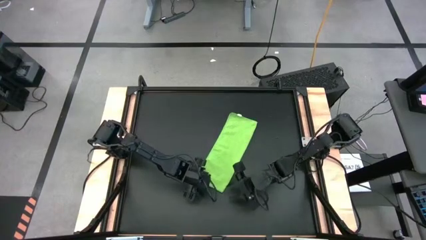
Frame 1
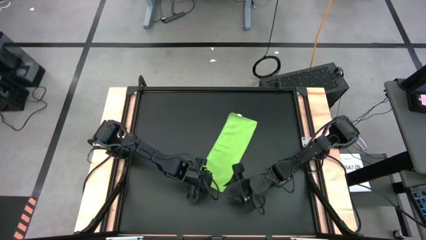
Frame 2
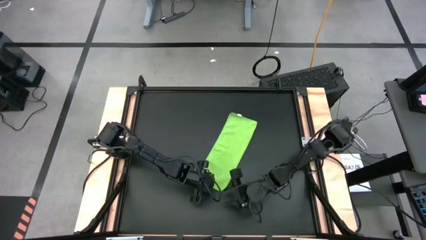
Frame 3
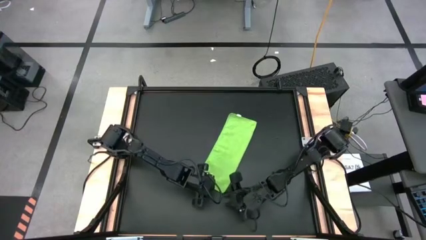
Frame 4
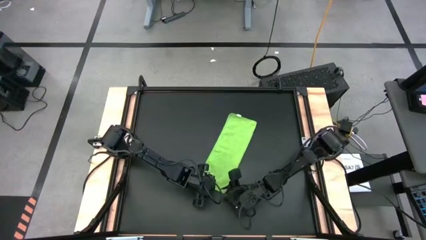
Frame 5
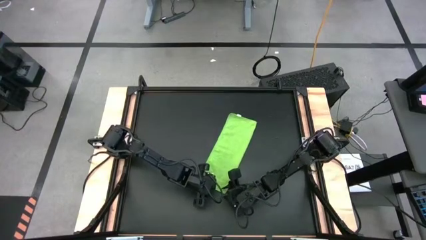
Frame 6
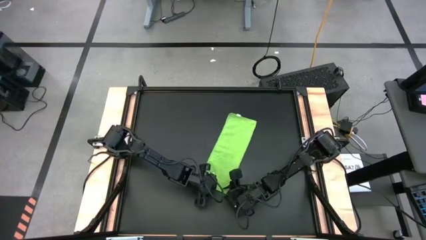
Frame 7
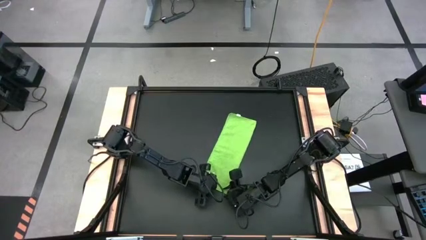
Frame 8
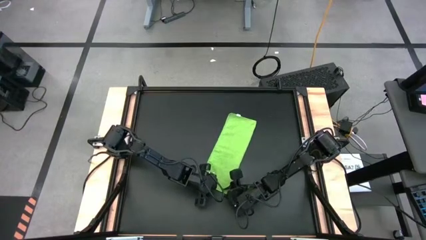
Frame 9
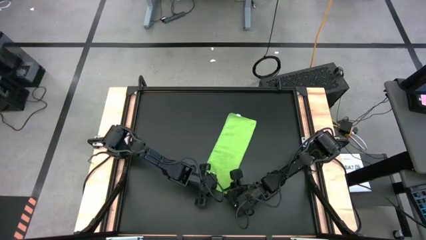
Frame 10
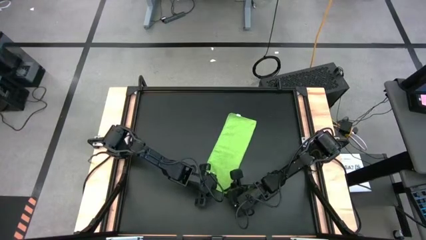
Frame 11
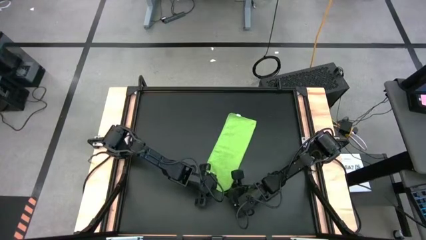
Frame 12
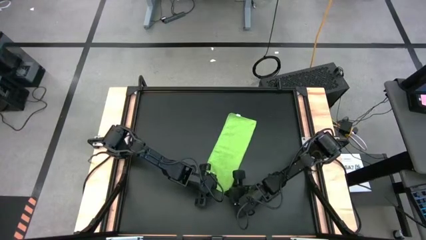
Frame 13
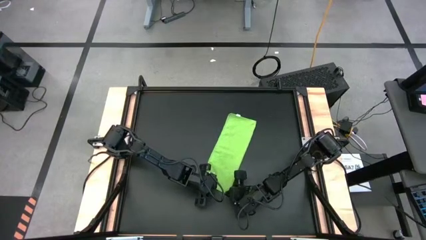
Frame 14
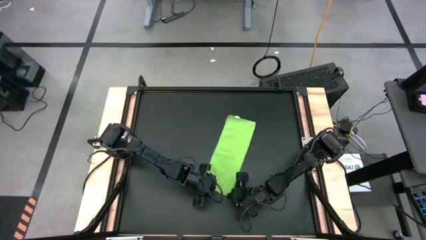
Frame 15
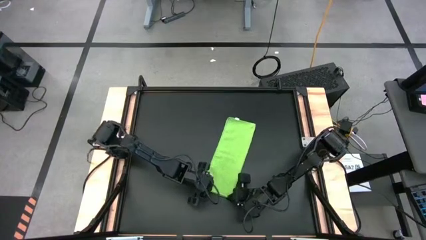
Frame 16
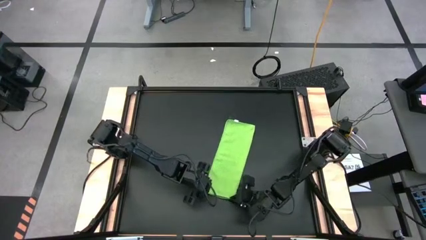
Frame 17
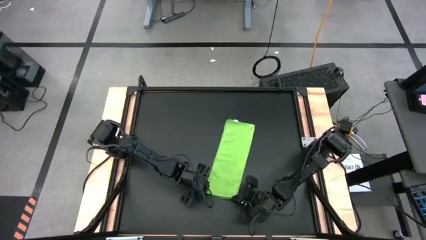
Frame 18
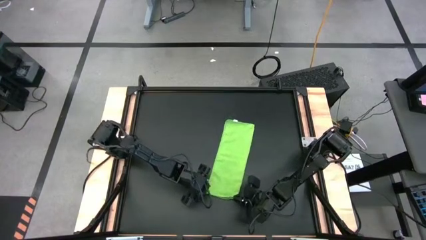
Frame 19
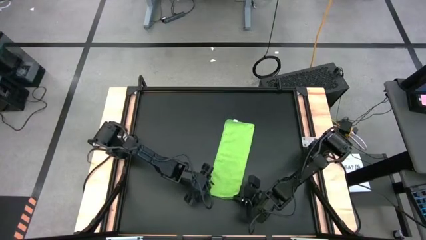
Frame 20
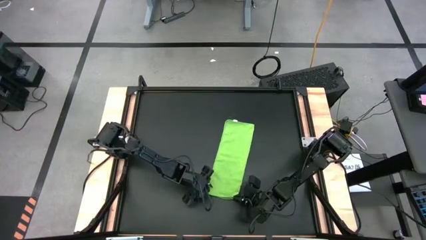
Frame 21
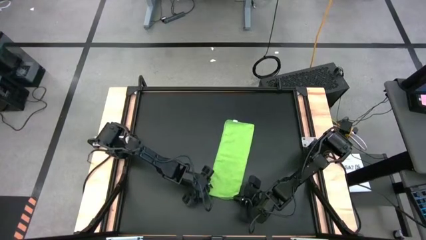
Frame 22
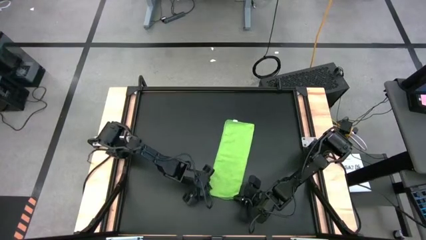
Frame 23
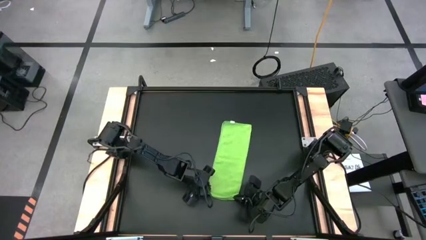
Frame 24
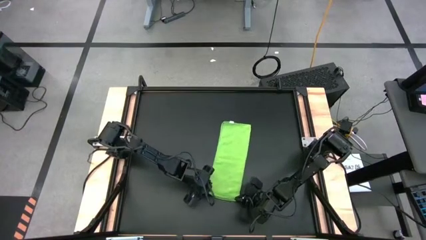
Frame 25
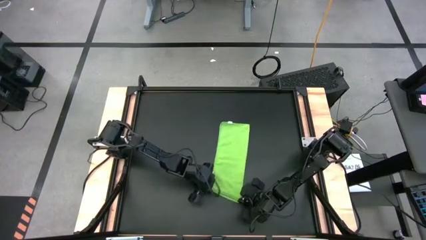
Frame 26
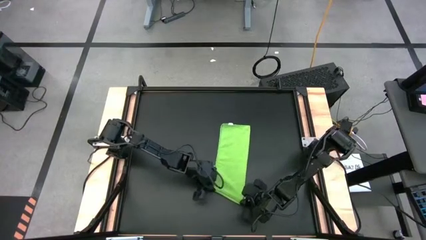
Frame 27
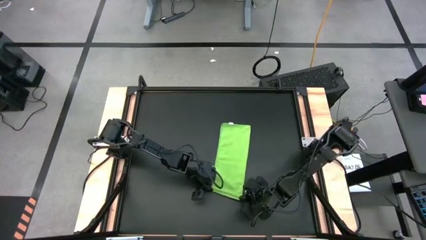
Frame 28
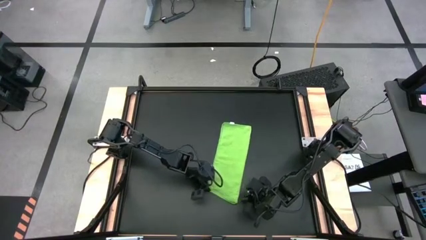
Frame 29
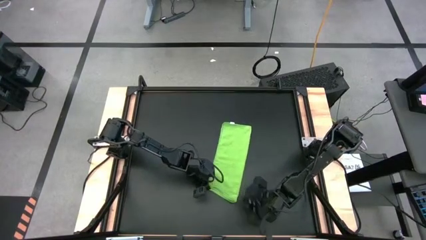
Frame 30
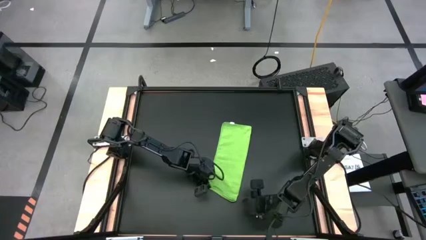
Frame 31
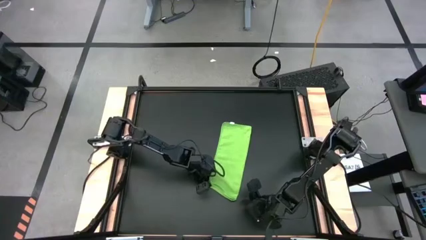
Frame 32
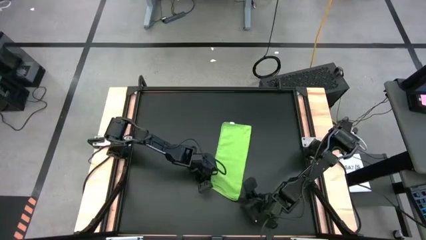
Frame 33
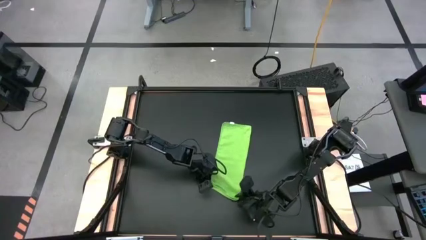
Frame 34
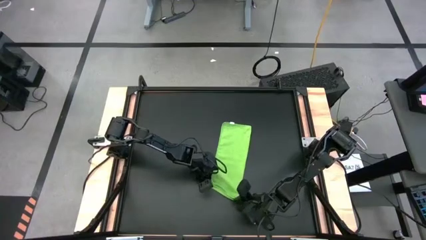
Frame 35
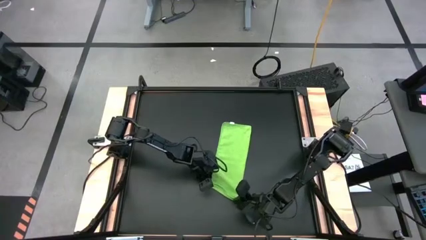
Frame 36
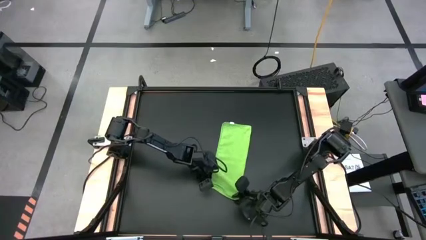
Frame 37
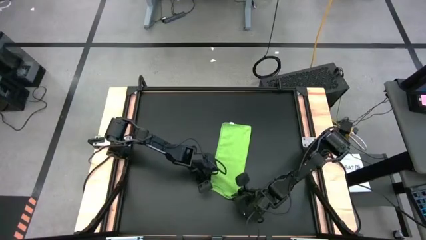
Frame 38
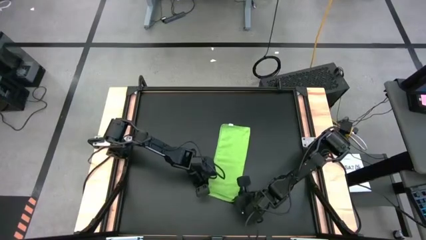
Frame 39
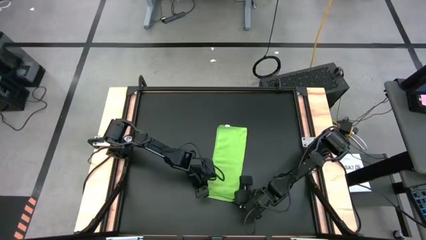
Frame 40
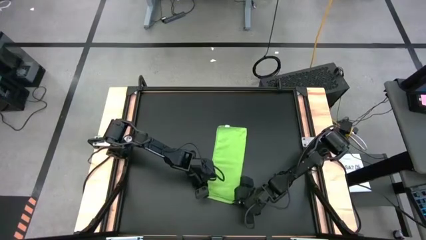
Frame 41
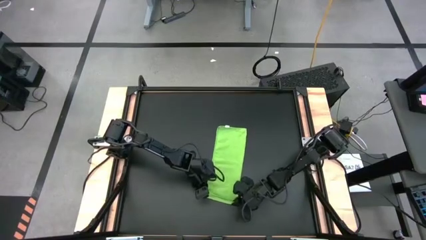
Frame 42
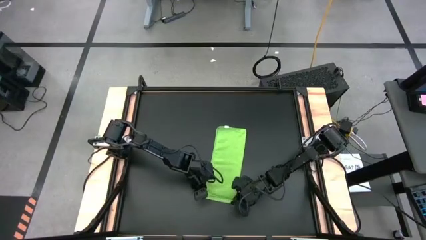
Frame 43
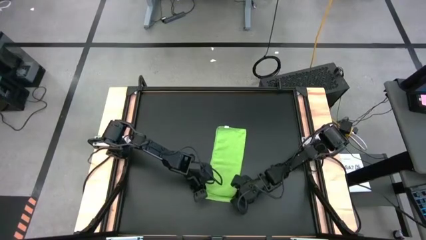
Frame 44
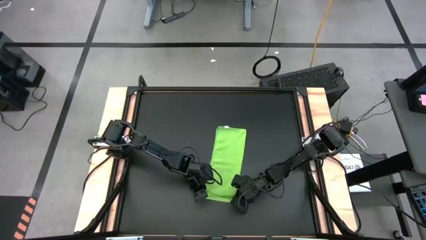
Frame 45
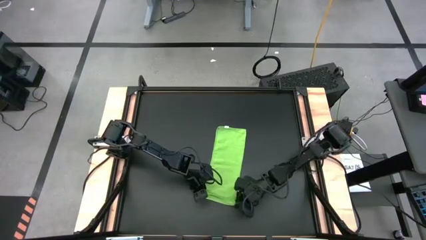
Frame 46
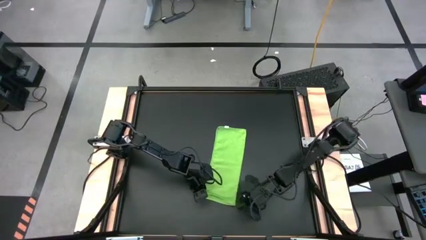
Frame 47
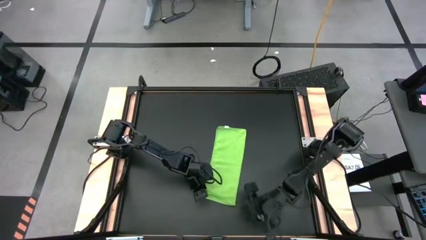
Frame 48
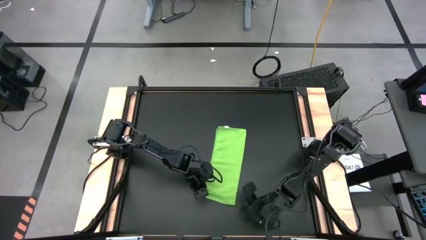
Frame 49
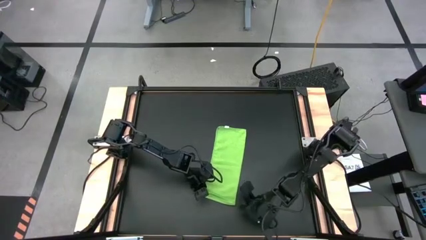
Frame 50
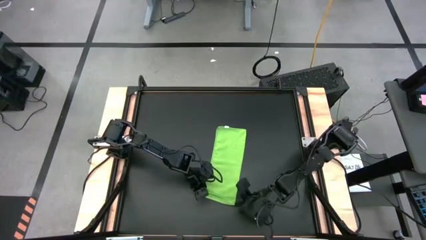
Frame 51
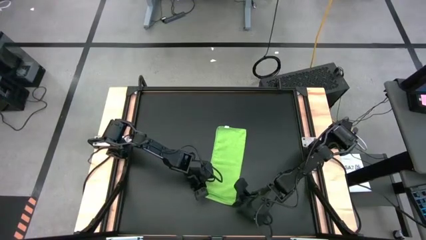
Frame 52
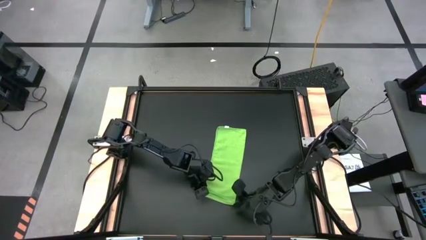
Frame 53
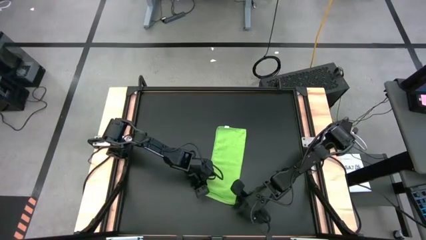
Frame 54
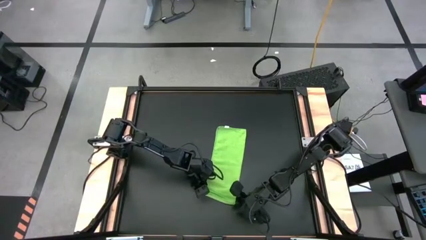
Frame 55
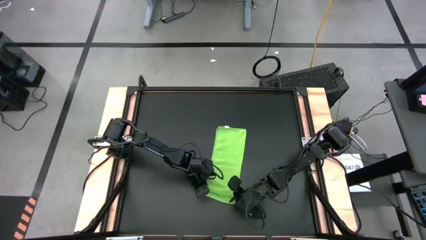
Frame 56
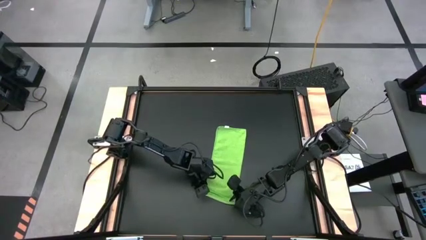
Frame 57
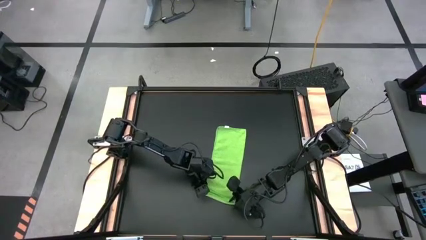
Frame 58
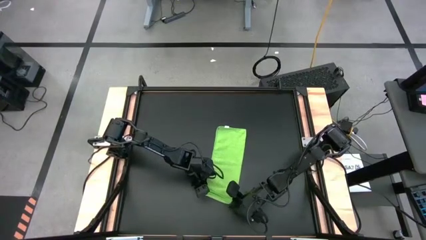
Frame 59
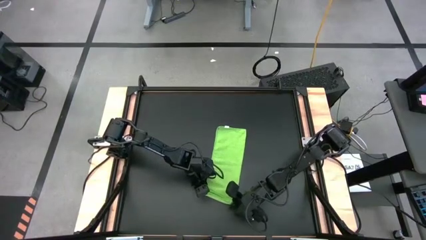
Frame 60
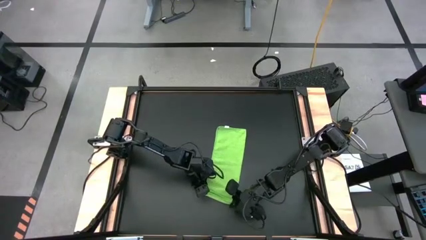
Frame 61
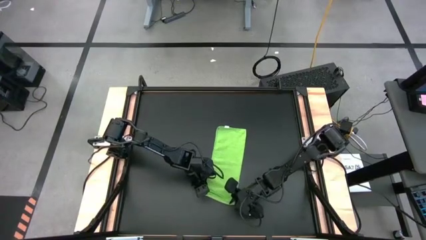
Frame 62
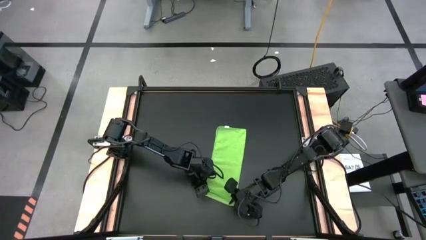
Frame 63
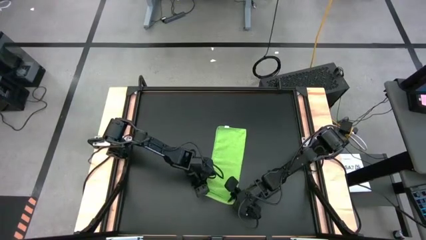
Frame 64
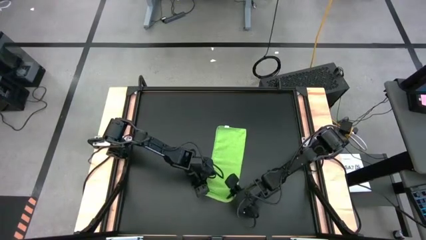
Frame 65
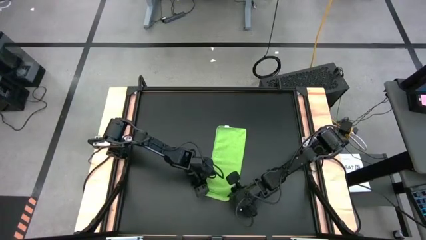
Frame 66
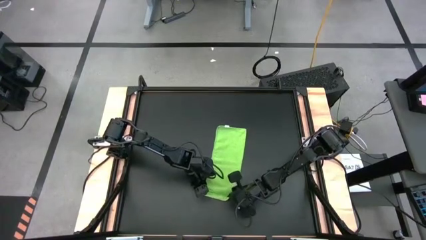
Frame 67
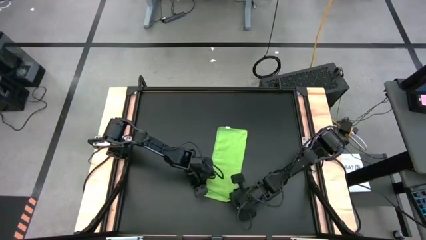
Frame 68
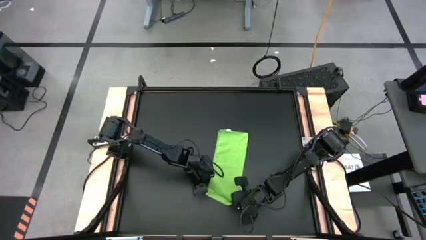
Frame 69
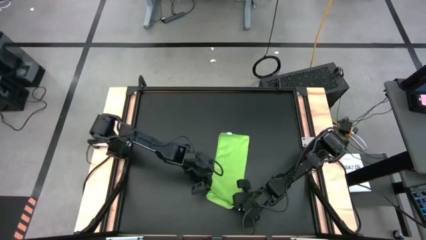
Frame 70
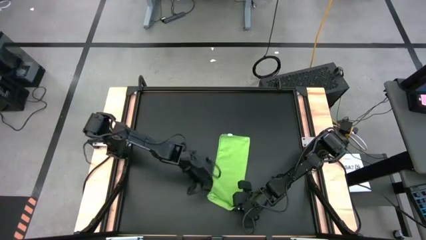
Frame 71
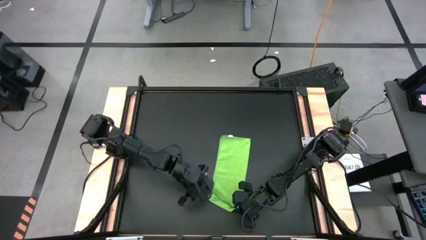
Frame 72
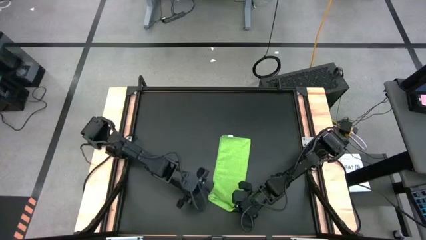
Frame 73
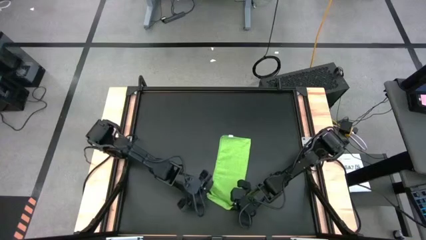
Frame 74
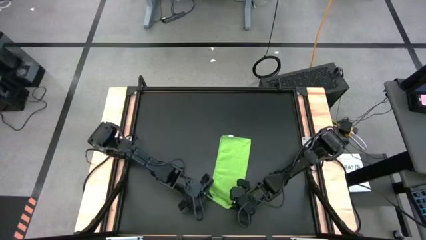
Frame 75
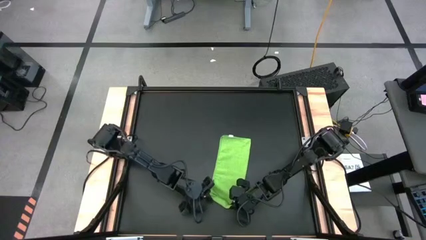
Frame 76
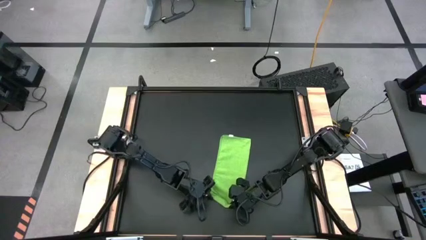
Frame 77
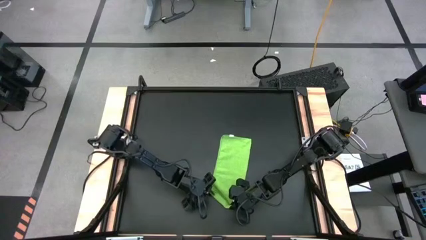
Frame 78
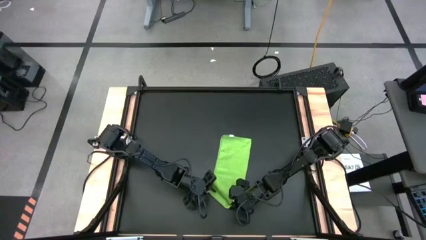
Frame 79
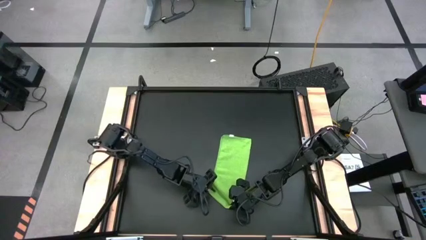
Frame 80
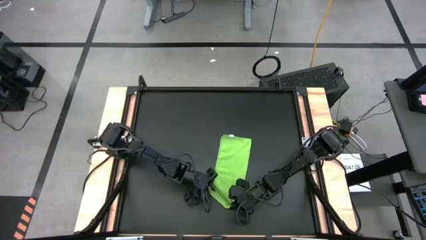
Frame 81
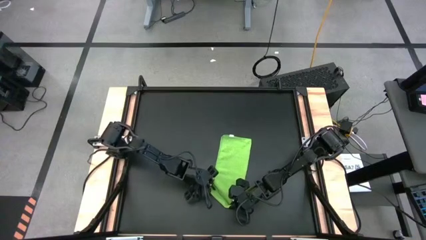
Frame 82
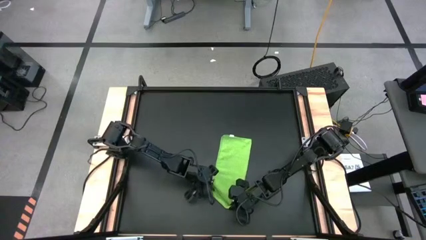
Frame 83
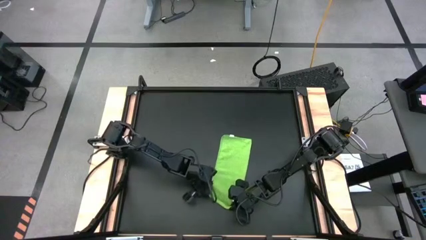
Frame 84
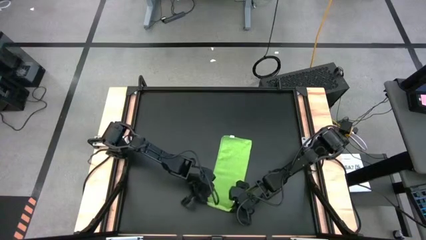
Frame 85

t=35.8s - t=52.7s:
Task: Roll towel into tight, uniform cylinder
Roll the green towel
